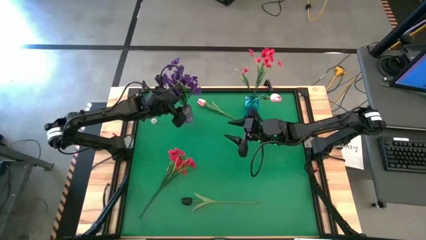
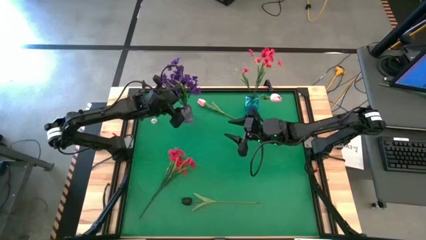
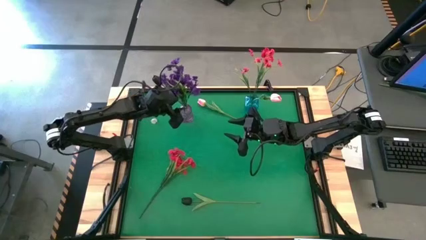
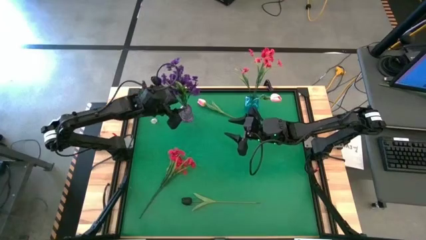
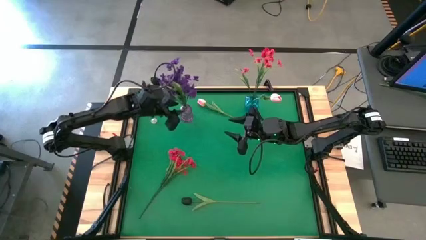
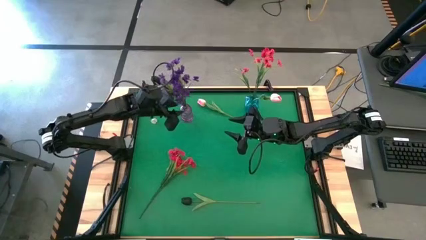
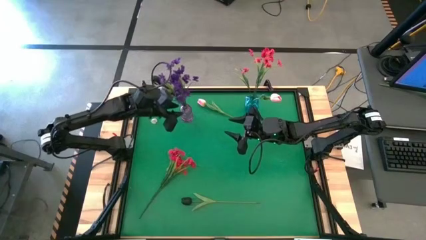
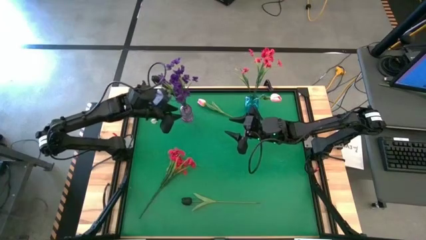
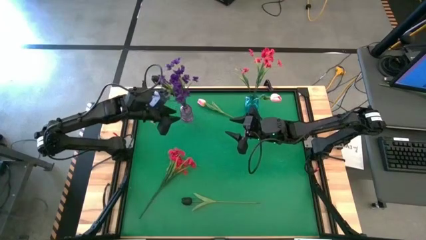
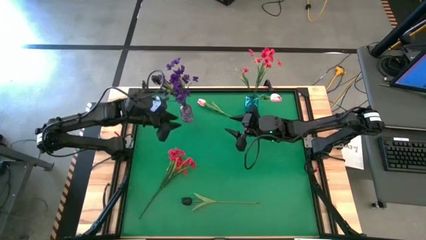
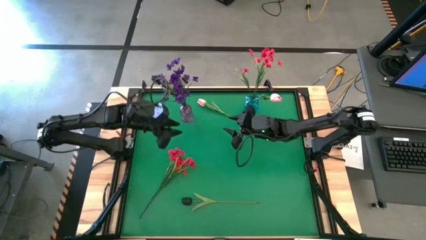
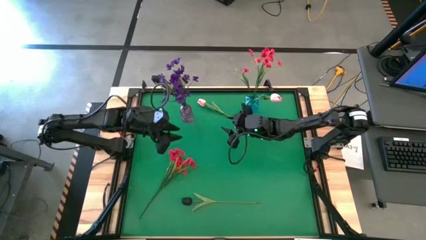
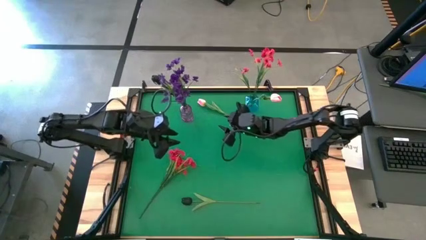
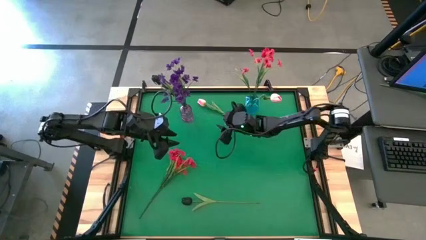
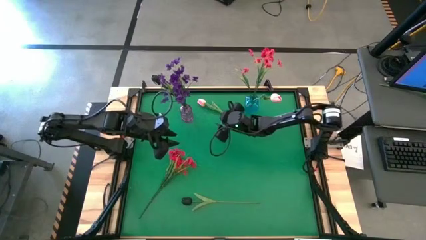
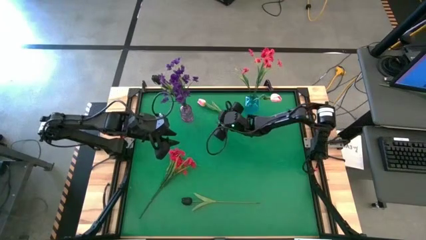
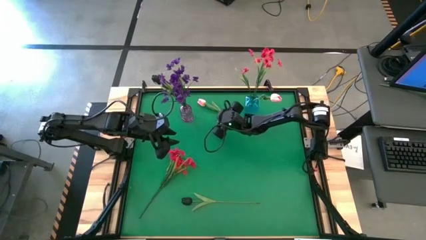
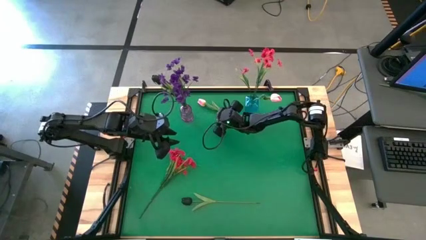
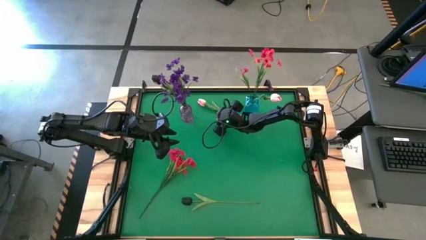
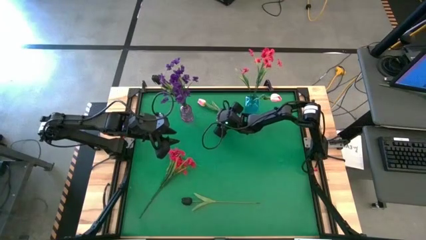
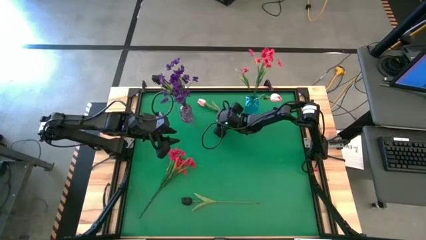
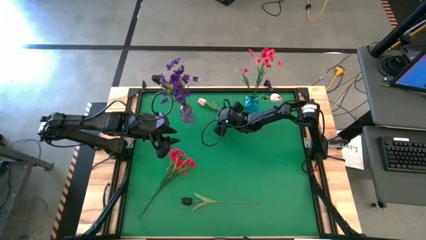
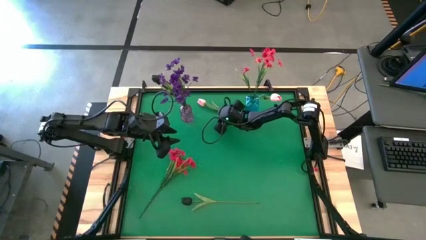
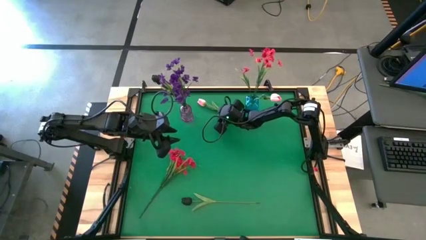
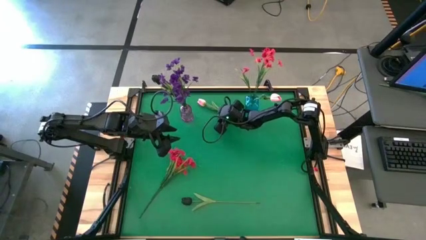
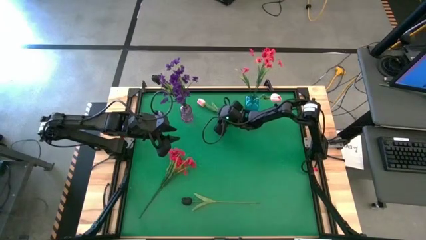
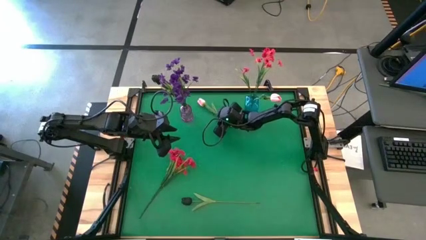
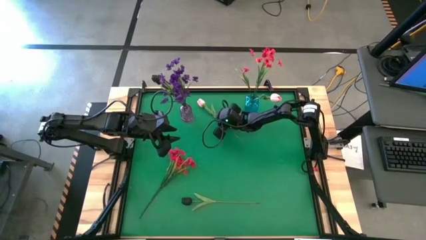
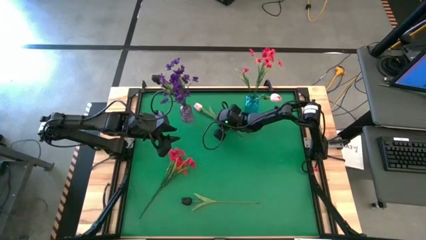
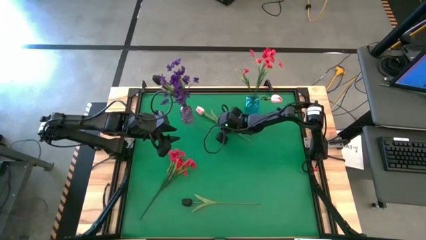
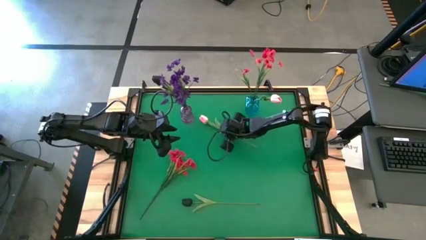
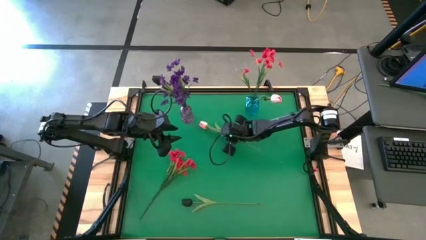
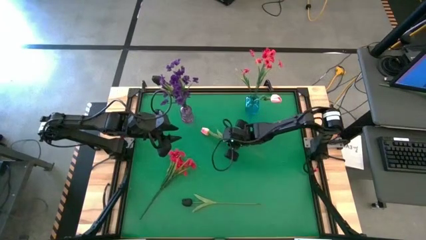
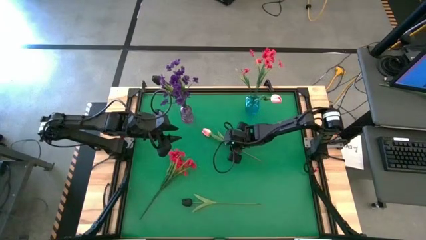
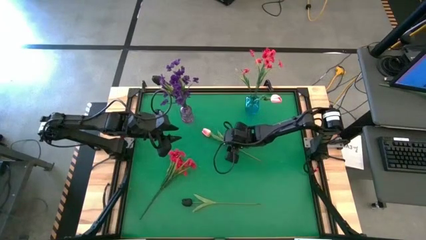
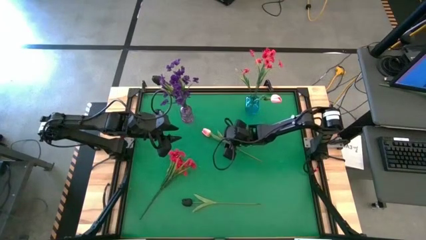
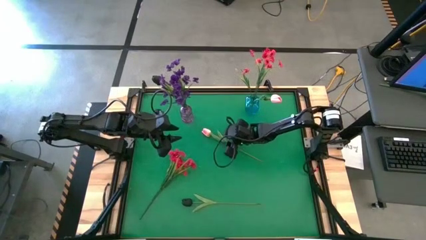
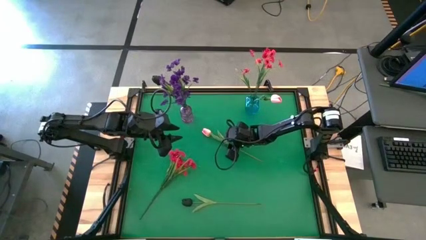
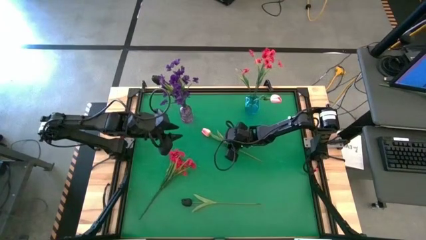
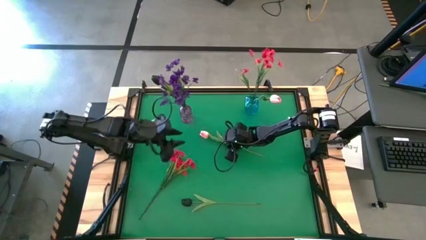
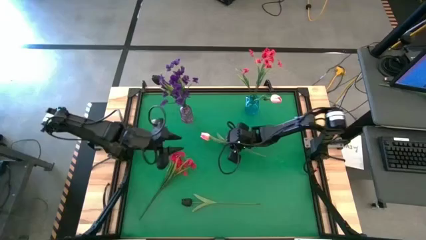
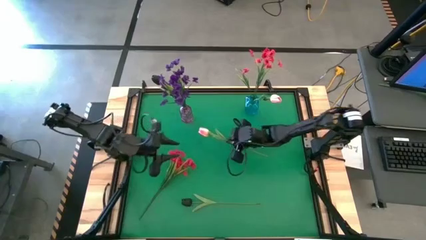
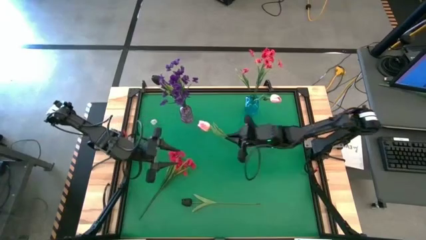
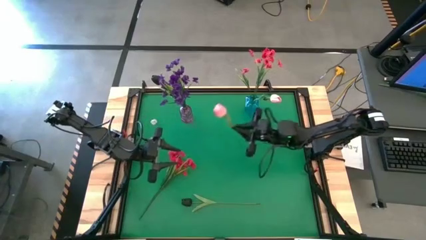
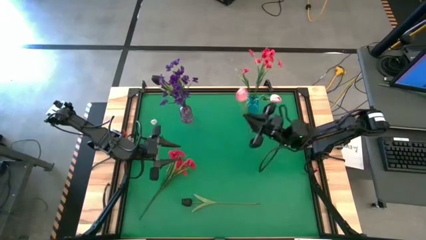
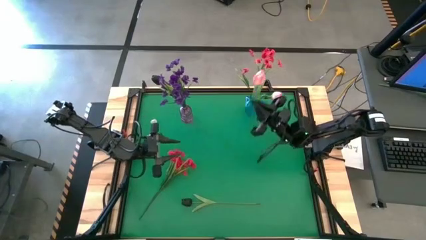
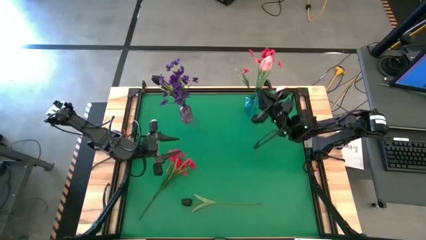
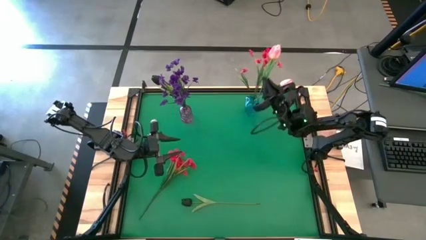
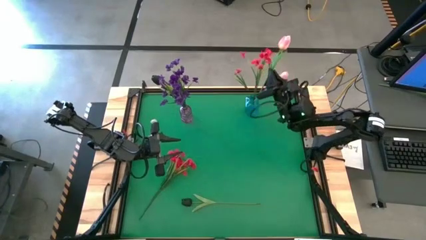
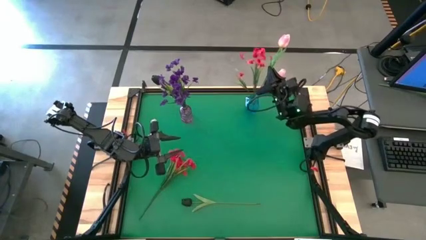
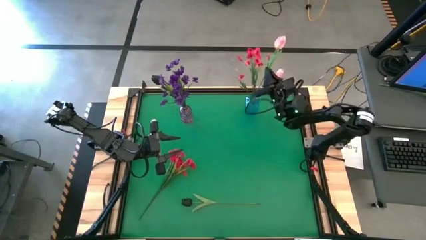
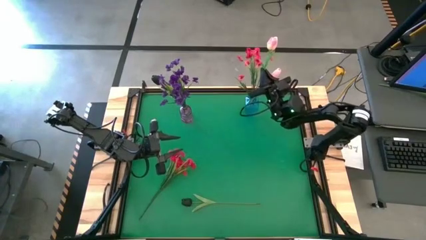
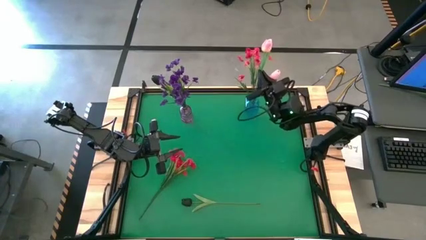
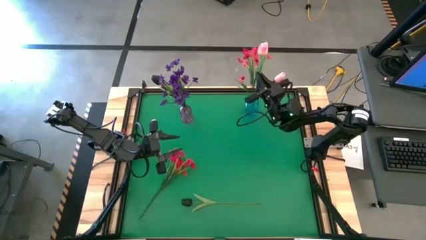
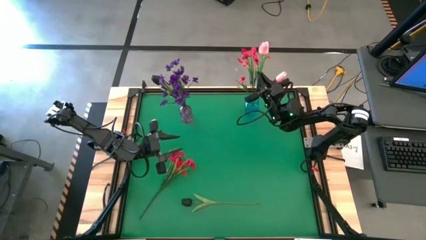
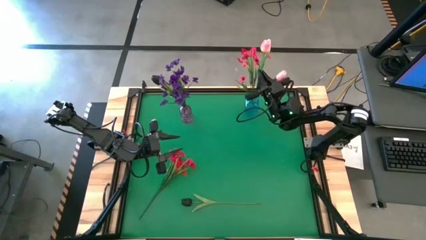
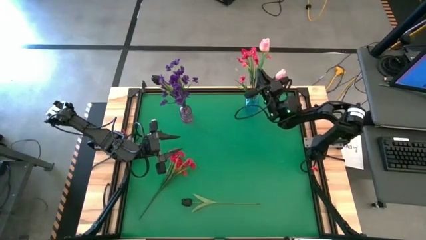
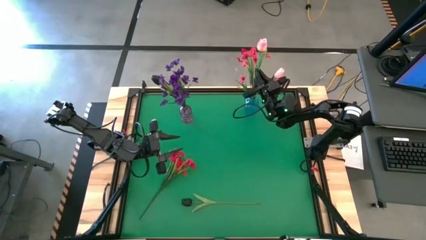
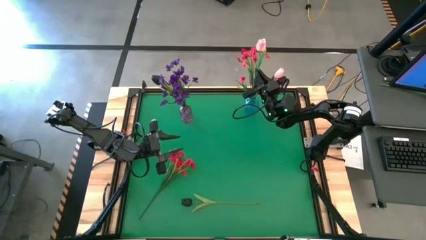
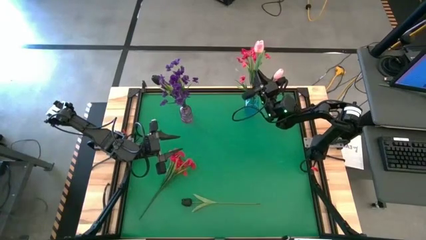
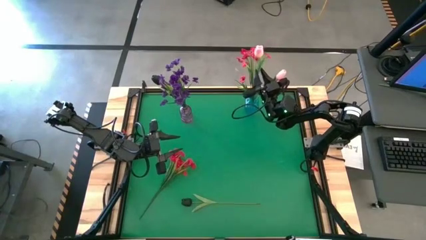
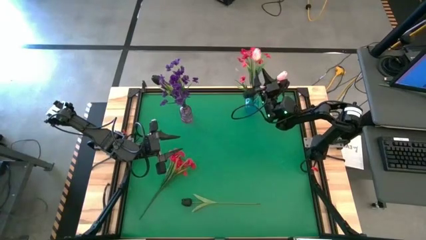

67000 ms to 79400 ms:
Task: Sort flowers into vase by color
Put the pink flower into the blue vase

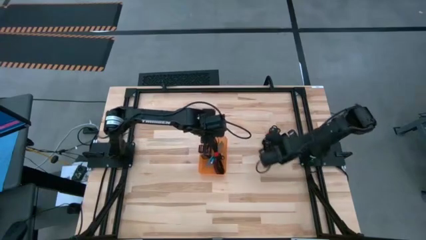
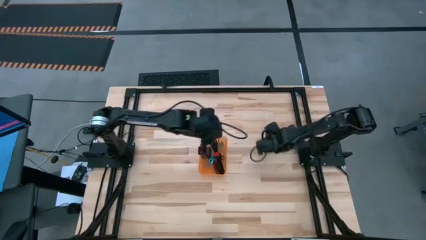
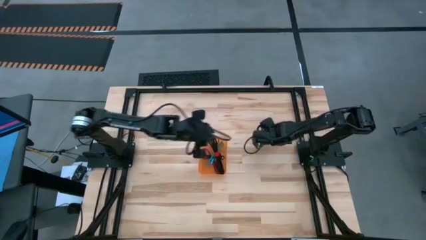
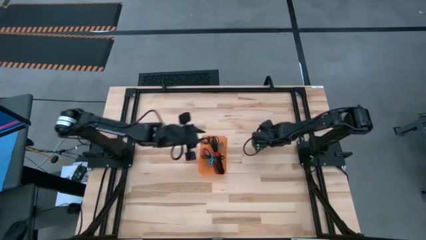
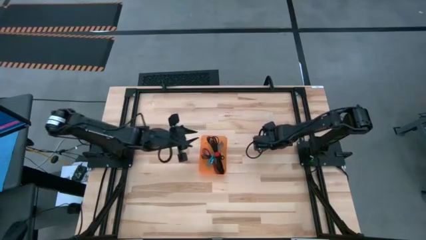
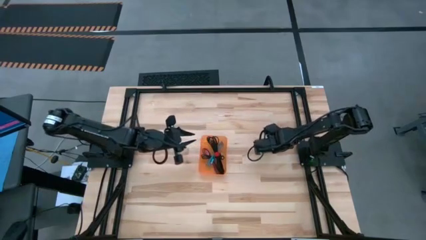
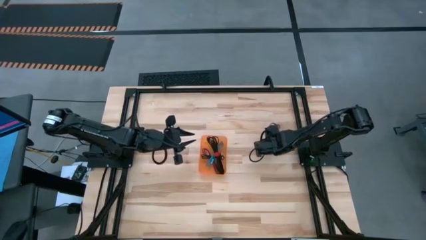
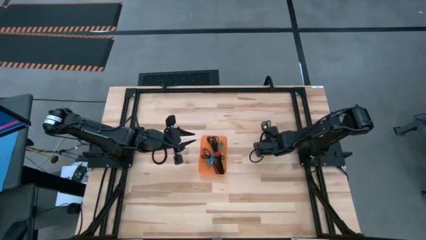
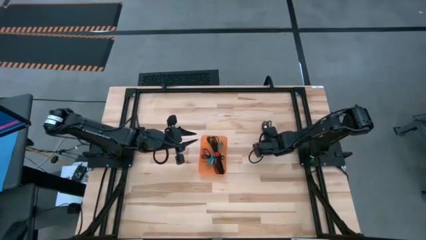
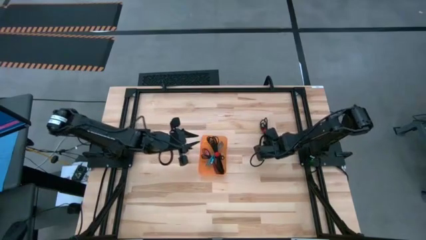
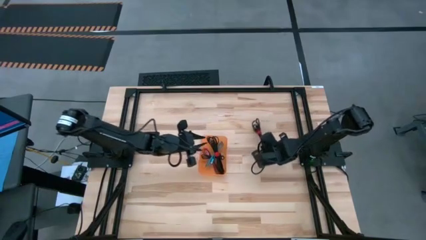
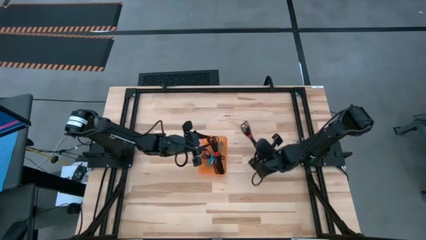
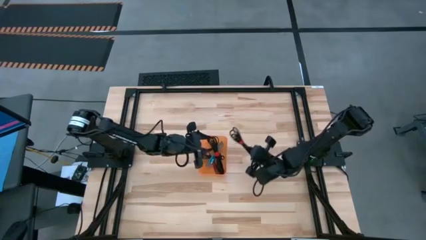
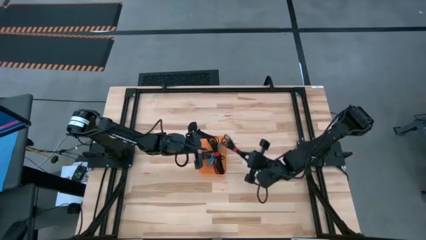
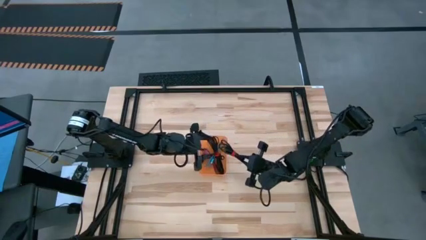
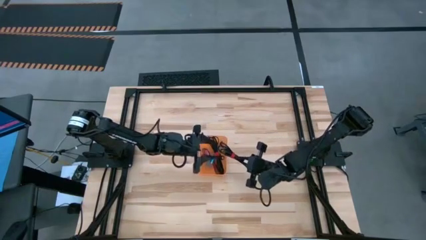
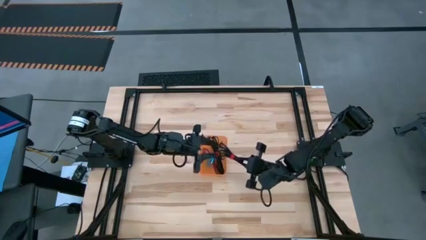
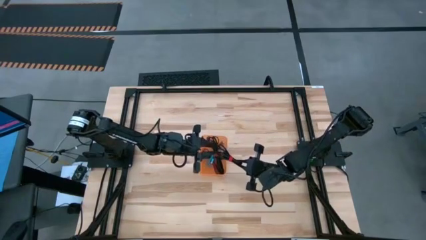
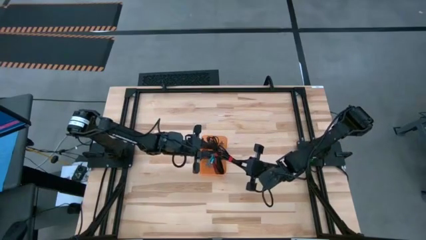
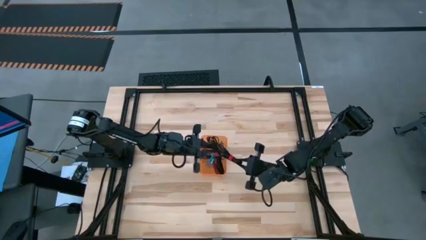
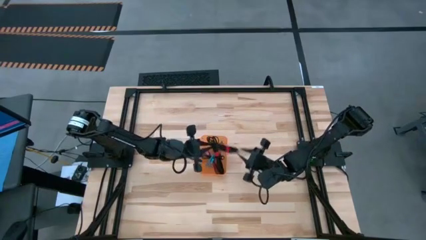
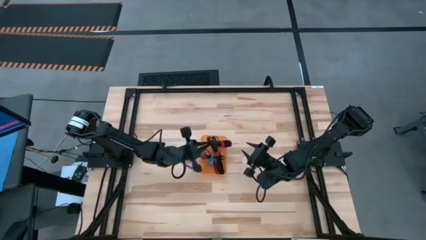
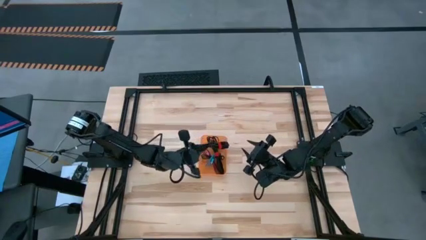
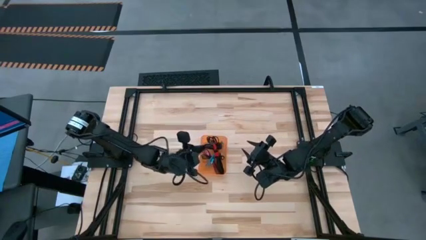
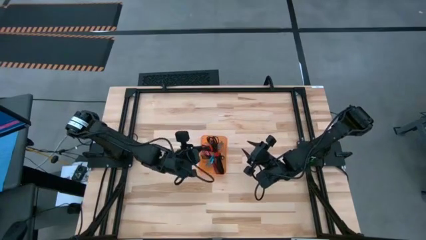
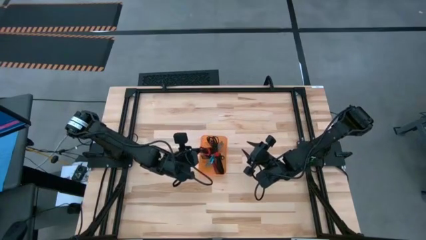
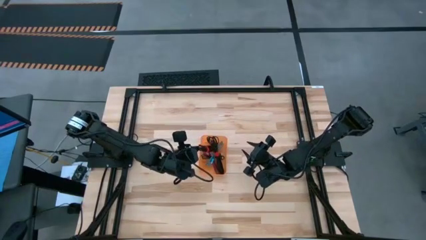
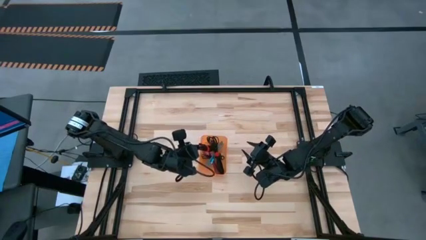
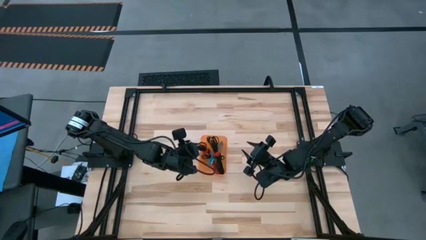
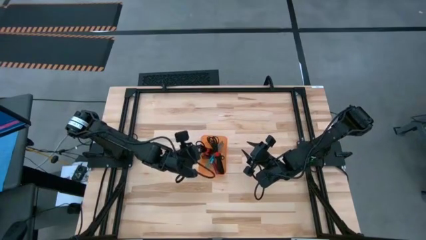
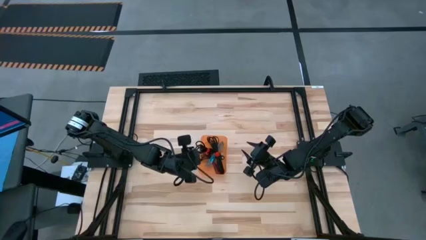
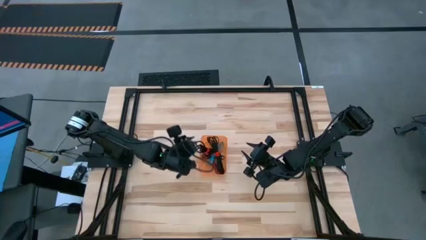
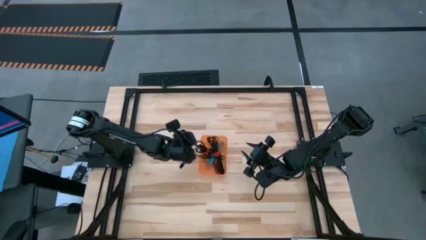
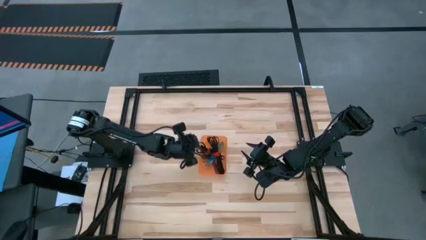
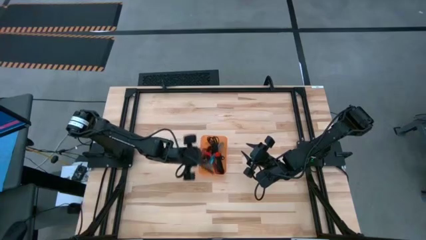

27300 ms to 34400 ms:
Task: Pick and place USB-C Cables
Put the black charger cable into the orange bin
